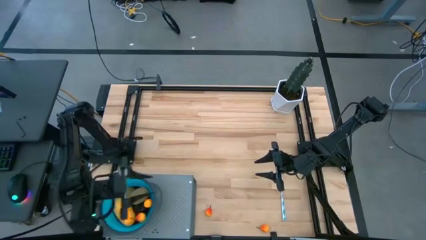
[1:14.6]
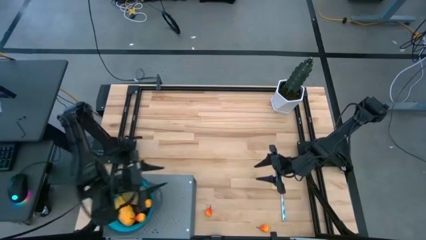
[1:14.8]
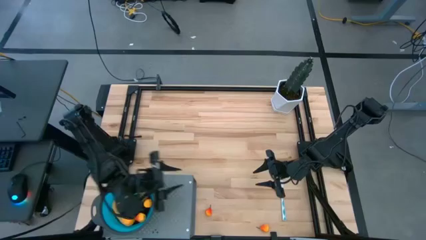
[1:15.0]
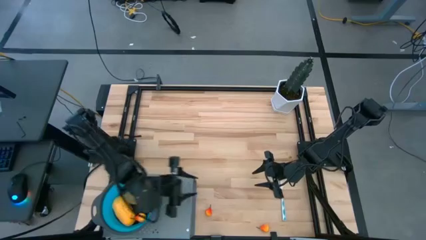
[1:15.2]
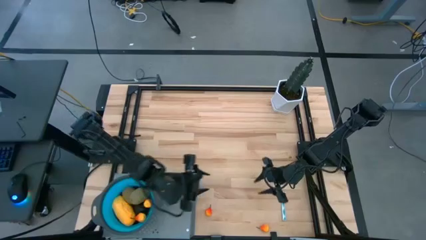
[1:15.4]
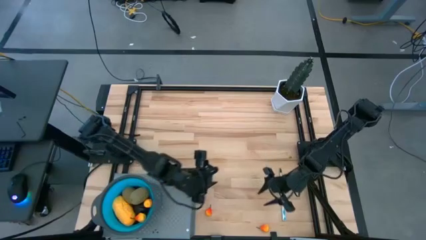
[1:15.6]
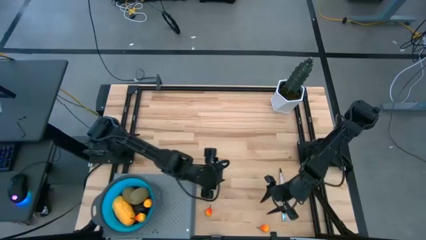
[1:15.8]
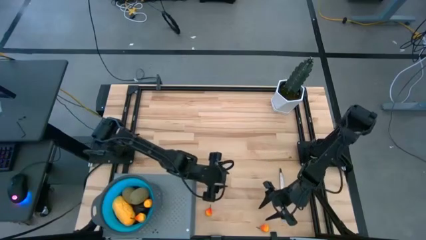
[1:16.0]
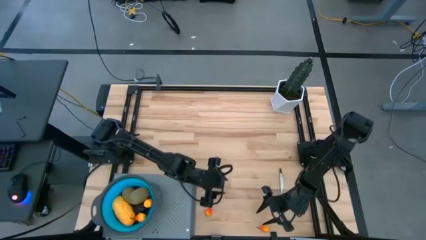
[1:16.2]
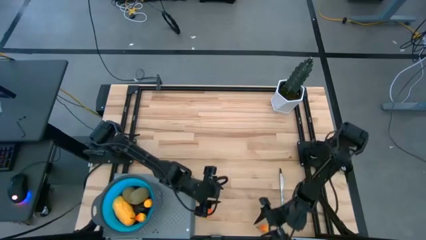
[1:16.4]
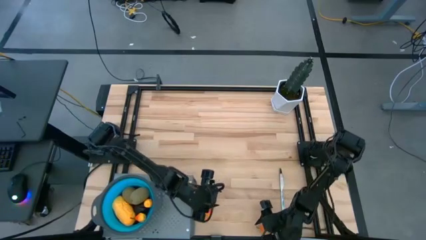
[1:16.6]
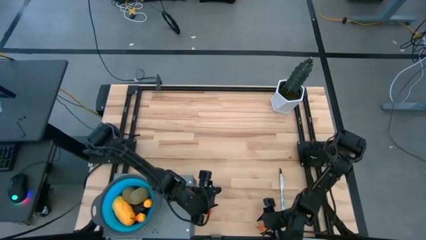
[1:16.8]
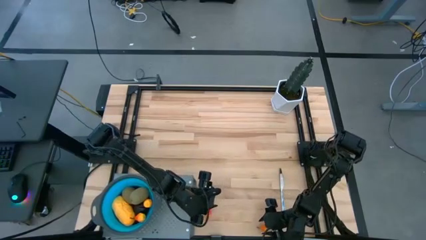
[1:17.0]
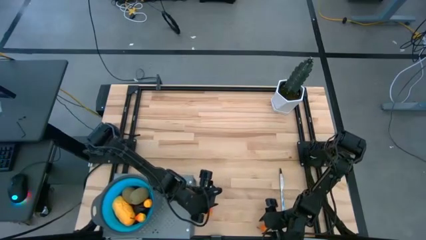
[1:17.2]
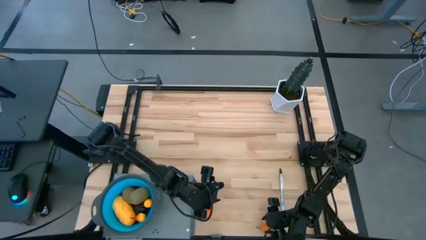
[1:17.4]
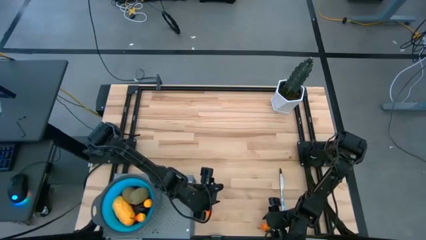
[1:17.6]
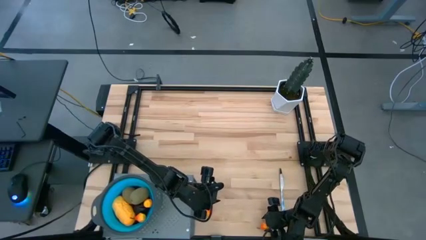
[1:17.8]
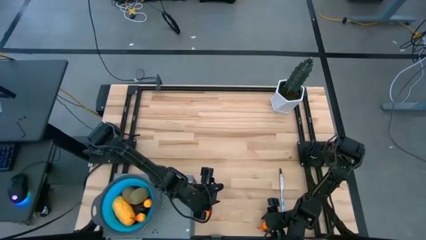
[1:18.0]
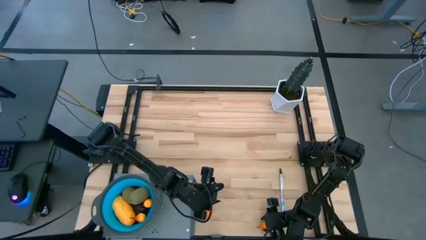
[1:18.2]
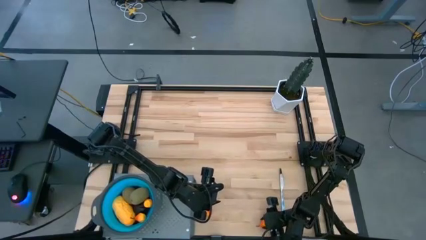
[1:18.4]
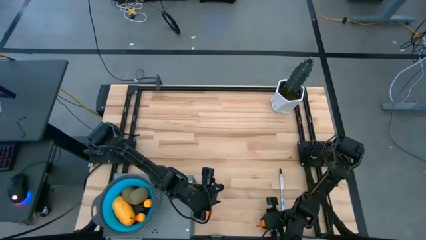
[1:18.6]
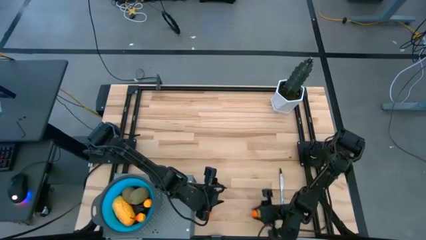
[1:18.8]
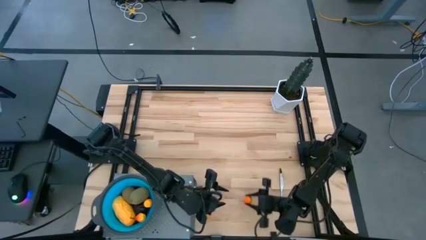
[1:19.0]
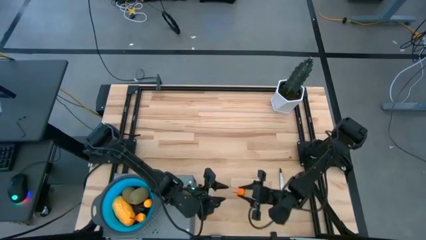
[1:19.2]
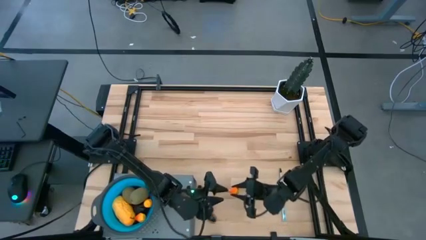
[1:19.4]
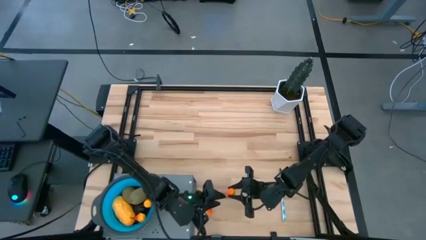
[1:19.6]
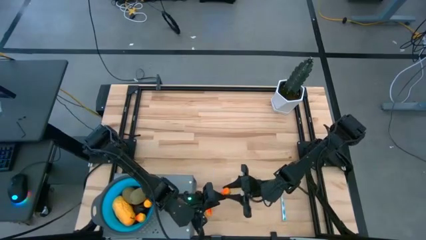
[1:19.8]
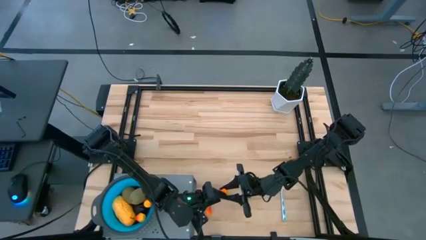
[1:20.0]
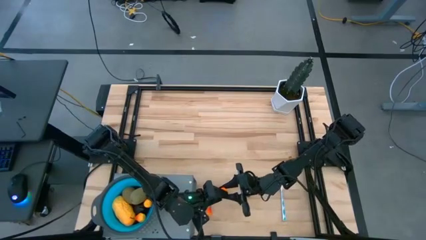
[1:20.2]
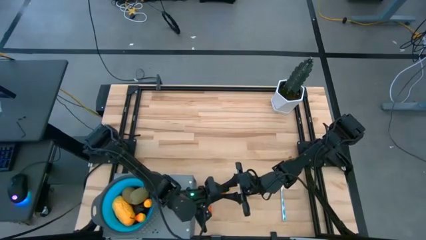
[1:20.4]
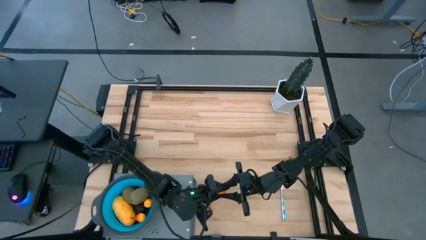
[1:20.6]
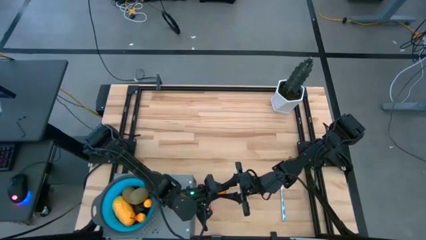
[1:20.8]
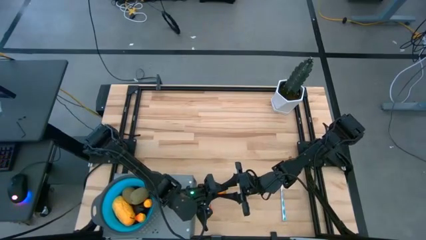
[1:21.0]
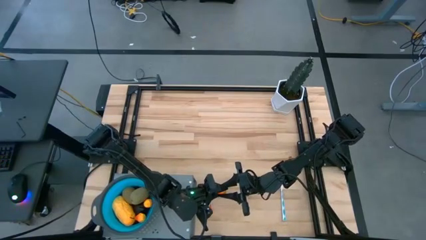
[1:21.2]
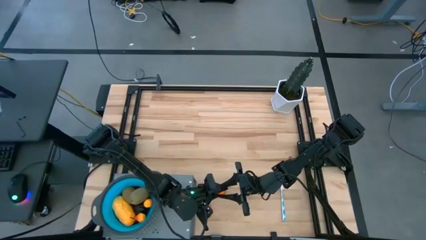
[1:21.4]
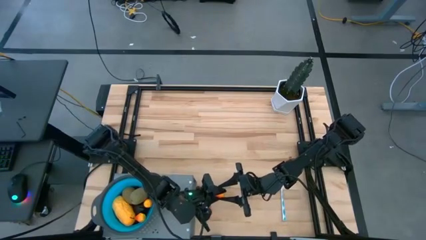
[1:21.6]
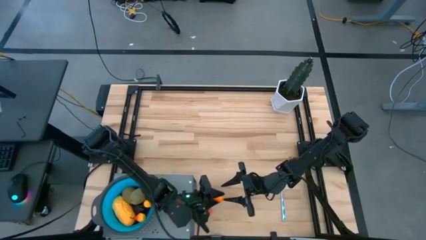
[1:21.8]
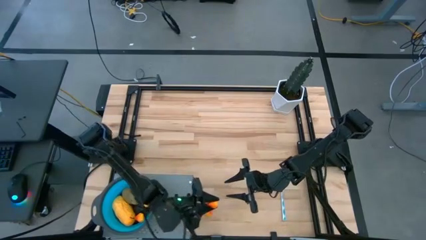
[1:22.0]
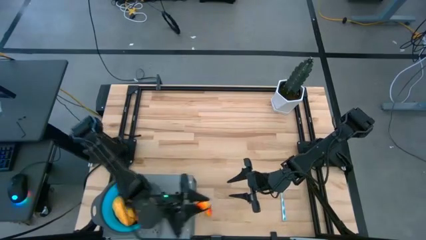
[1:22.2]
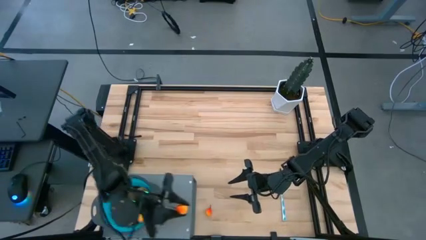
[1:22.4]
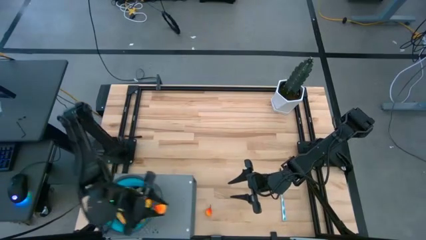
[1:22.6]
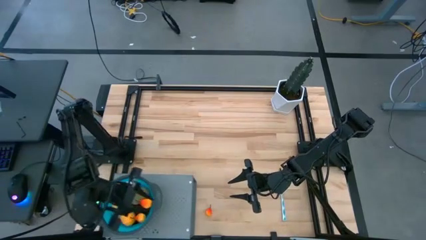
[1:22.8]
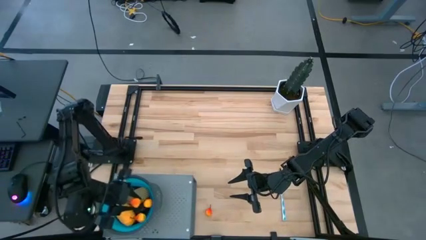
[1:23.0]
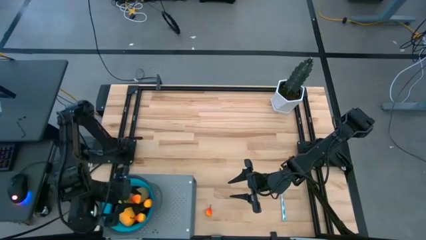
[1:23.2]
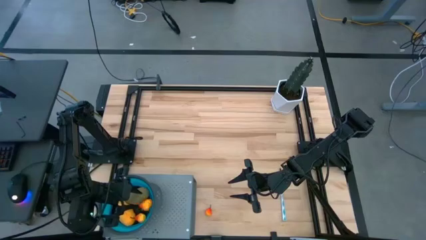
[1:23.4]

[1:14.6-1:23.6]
Task: Pick & Place Fruit
Put the pear into the strainer bowl

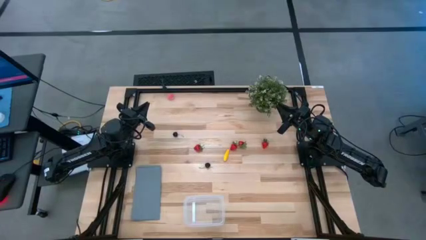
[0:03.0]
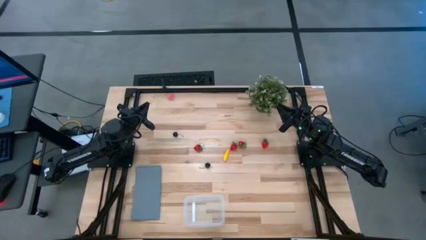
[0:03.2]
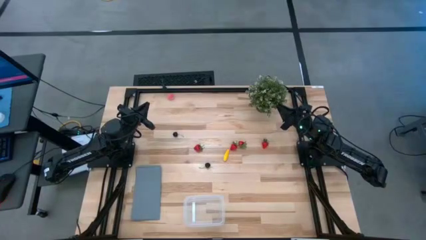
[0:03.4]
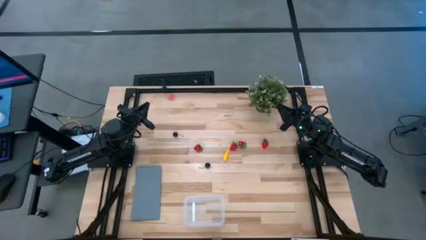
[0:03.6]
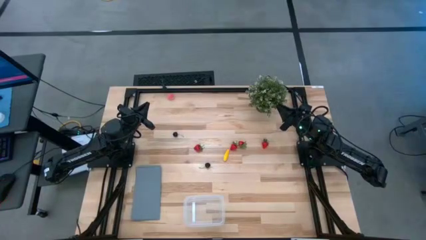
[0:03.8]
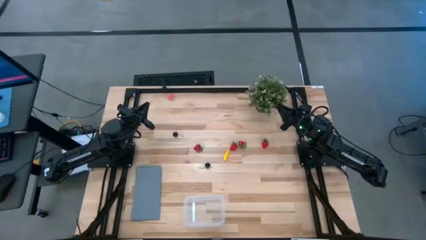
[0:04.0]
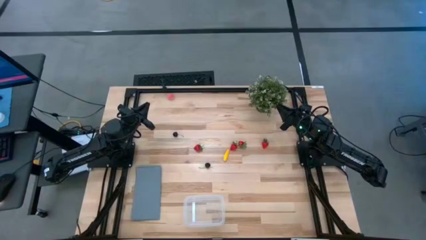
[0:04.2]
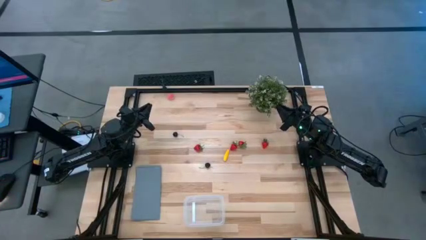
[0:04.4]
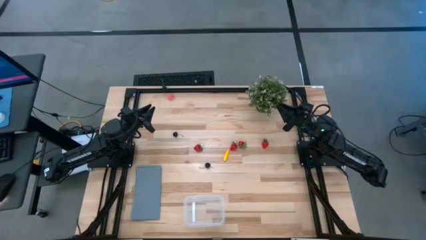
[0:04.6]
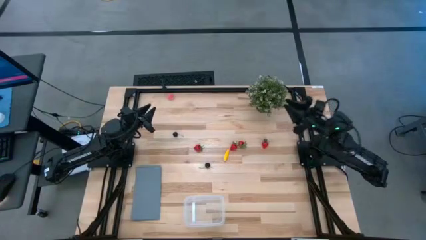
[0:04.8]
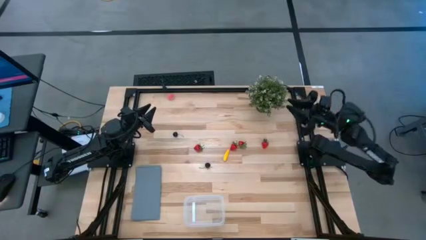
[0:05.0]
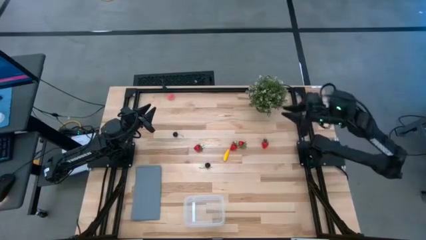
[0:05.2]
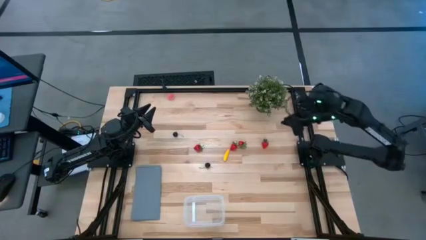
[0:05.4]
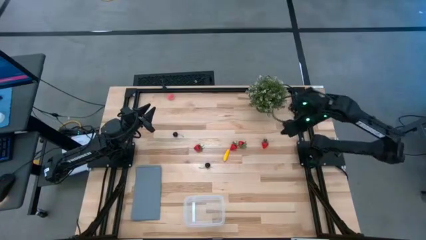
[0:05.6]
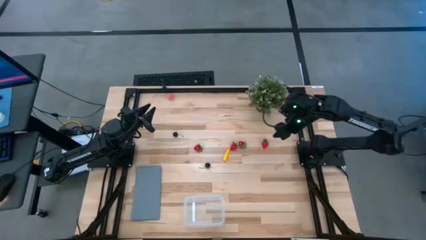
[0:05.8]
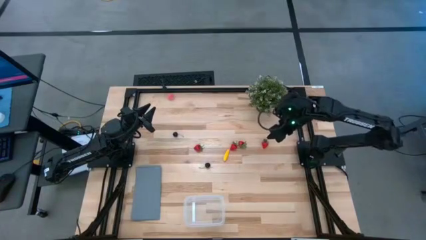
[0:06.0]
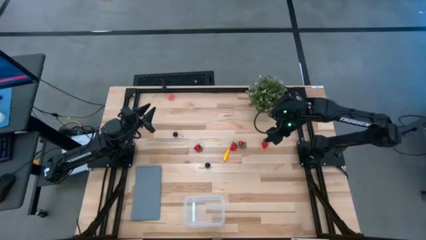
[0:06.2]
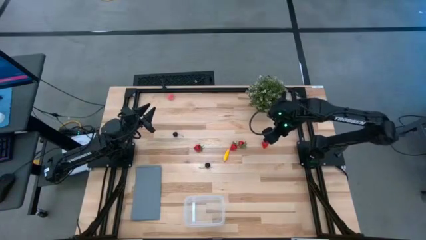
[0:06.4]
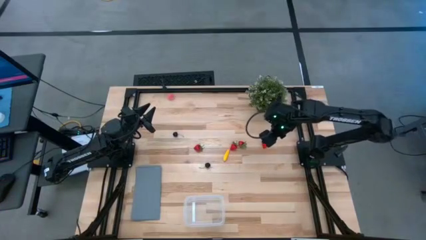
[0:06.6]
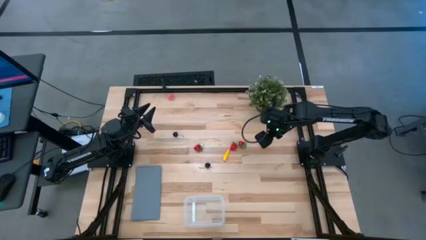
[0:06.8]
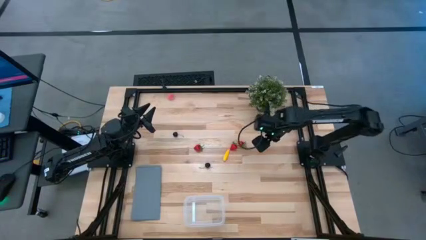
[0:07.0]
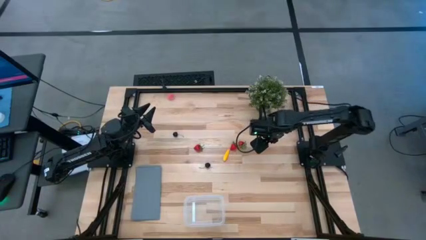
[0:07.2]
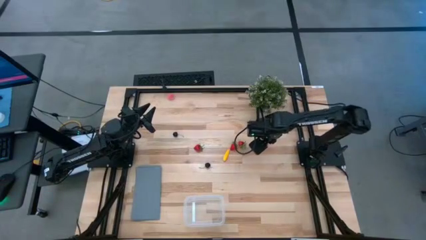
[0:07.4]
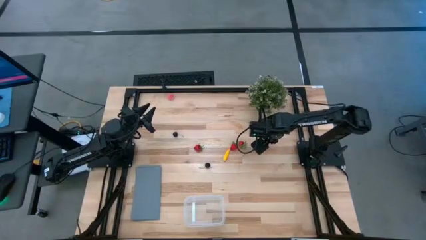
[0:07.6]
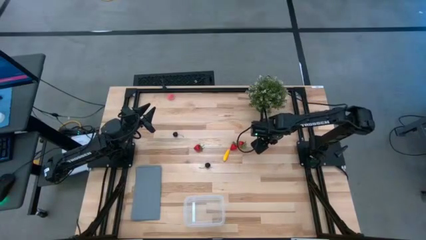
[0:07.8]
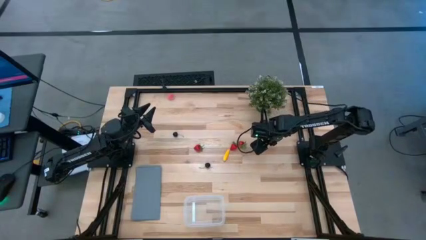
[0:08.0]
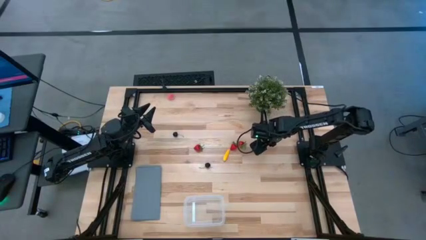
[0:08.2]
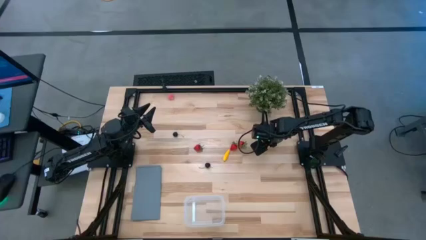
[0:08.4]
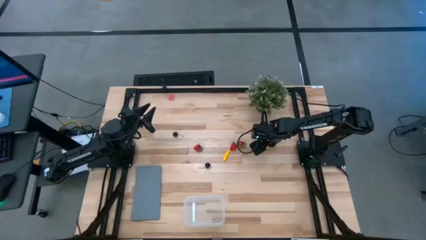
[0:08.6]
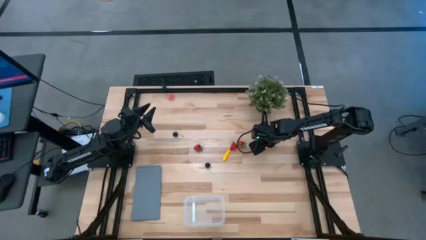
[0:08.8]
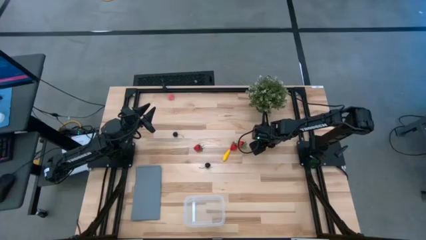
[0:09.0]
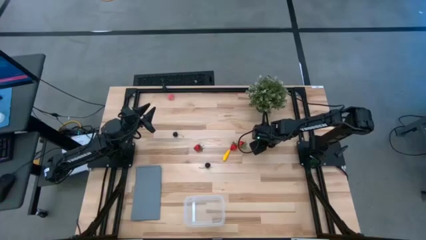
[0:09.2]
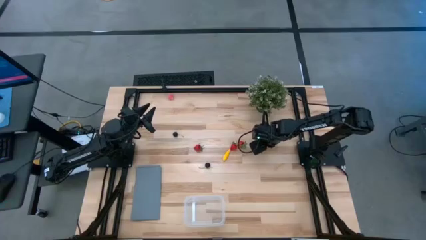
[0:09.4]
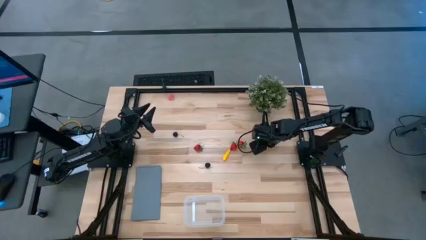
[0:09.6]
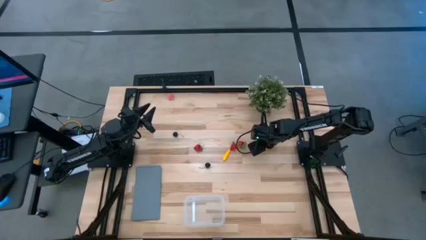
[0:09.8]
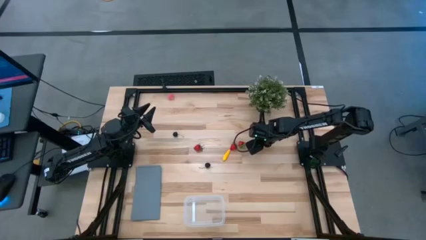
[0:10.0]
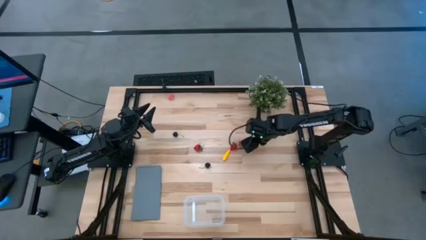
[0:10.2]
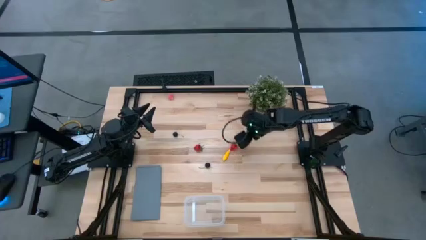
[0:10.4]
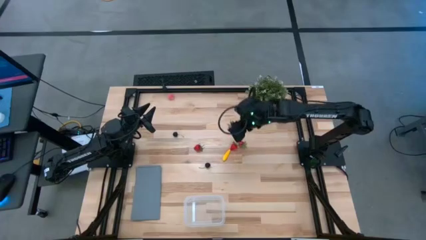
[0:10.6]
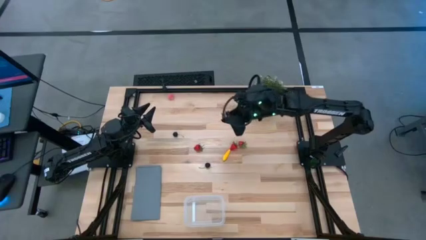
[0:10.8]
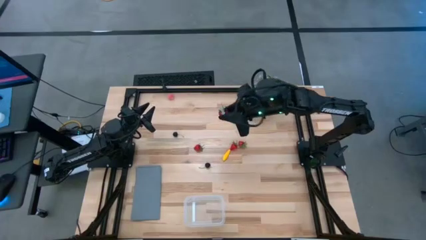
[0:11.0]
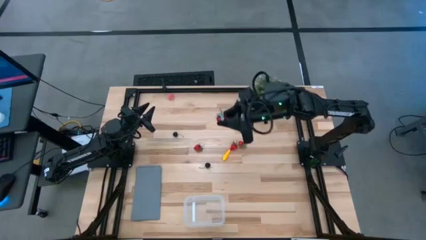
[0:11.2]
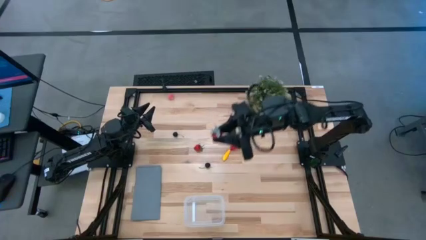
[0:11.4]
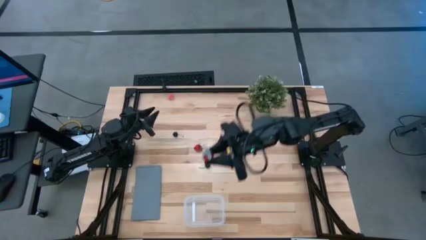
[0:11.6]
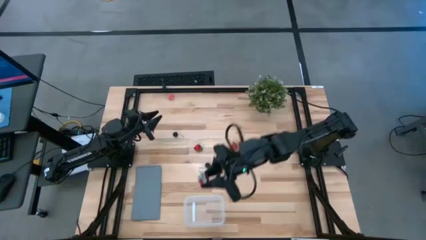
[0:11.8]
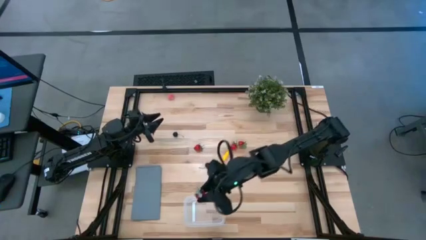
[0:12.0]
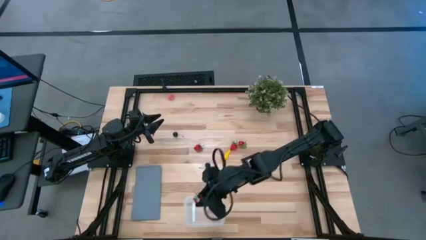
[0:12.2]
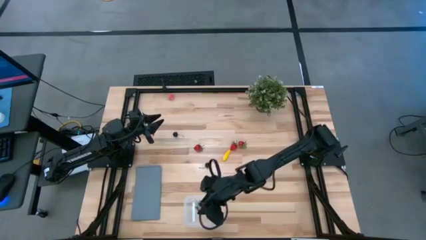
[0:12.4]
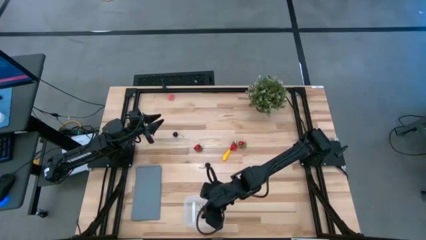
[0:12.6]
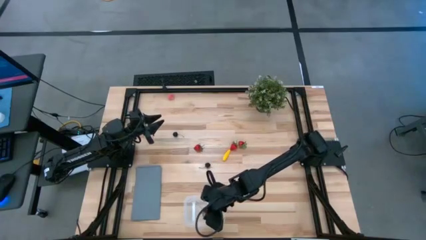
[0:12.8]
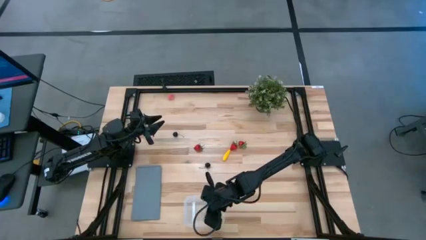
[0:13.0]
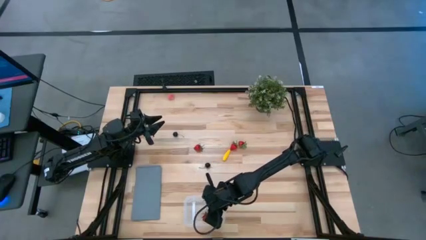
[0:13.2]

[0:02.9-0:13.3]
Task: Pick and placing Produce into tupperware
Put the red strawberry into the transparent bin
